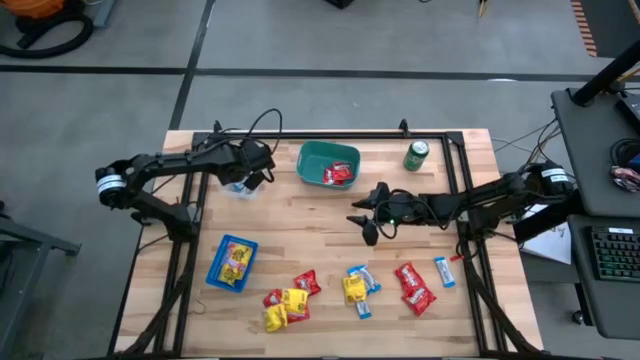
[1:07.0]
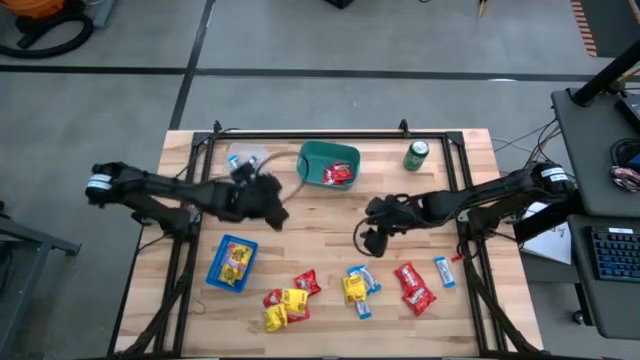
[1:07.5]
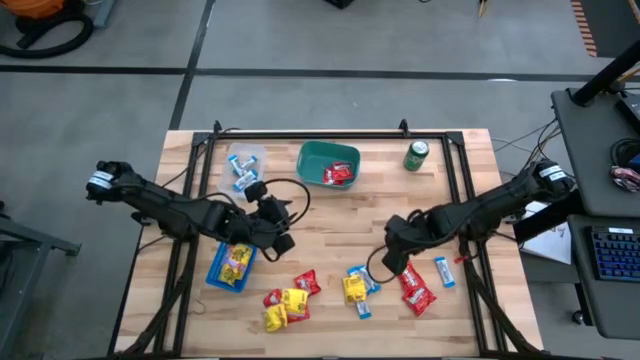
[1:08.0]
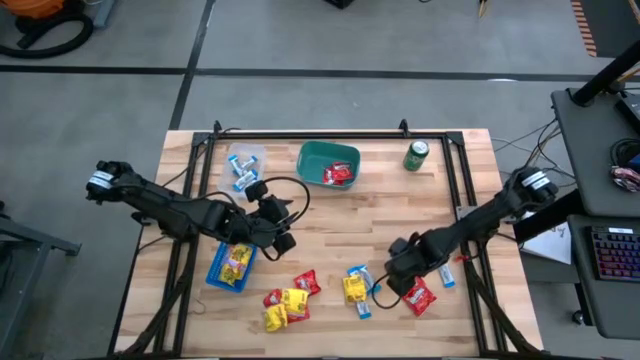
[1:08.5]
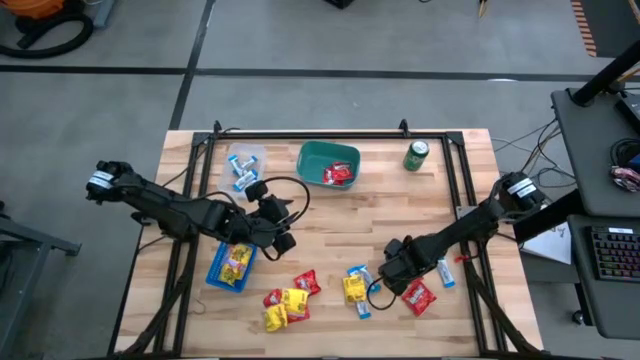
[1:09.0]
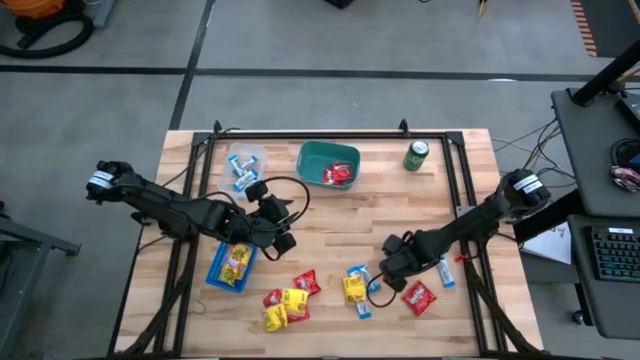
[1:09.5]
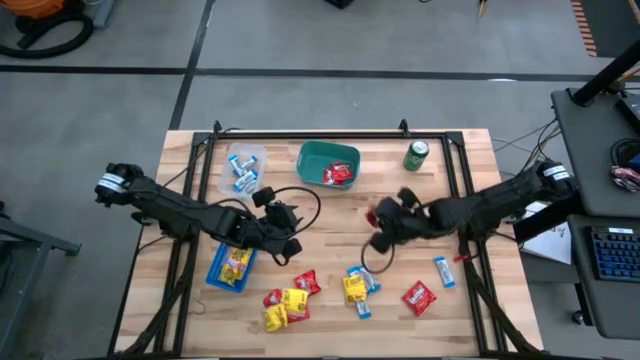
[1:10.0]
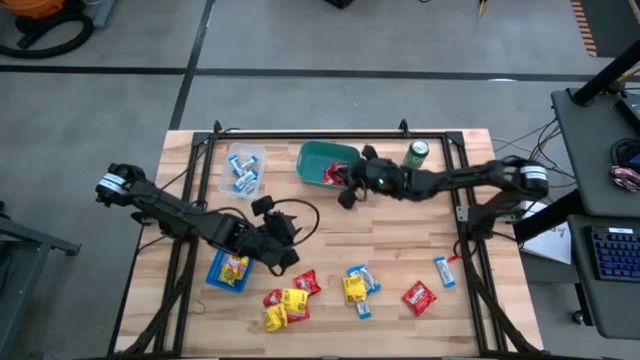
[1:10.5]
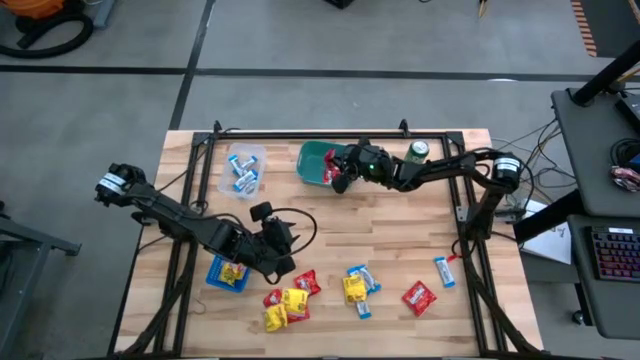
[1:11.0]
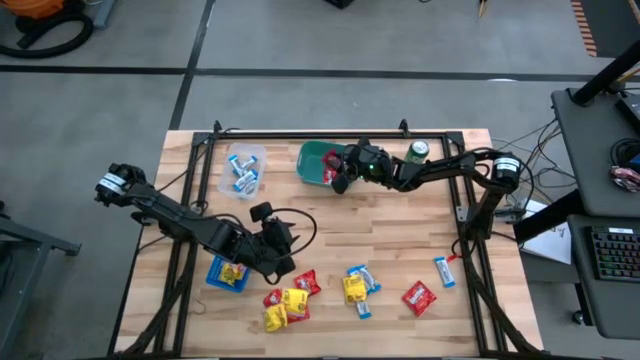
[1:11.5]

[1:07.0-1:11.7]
Task: Sort candy
Put the red candy into the green bin

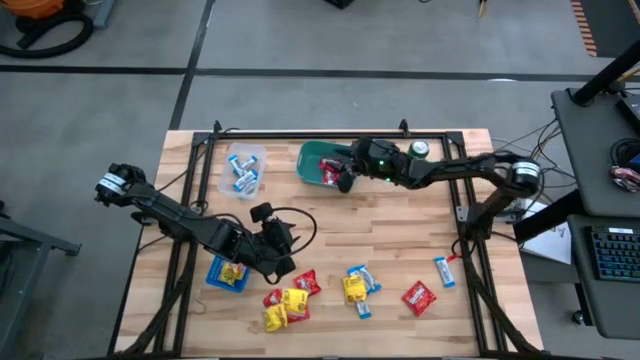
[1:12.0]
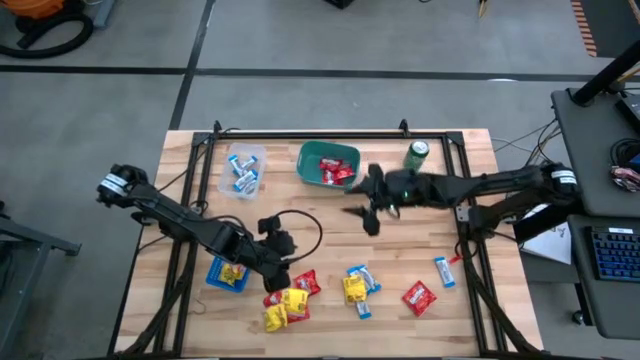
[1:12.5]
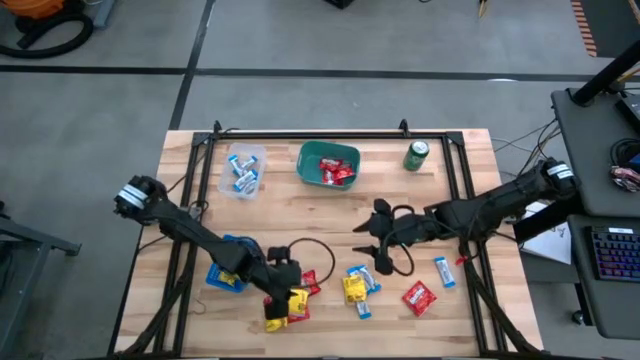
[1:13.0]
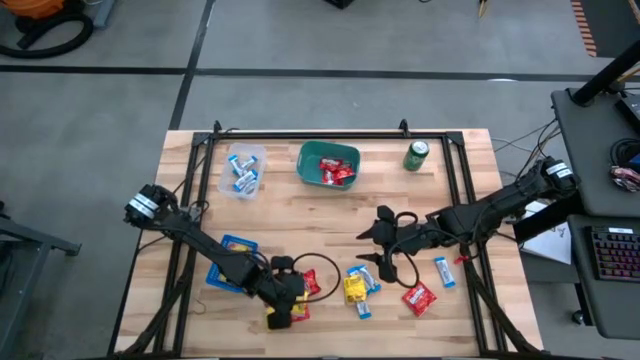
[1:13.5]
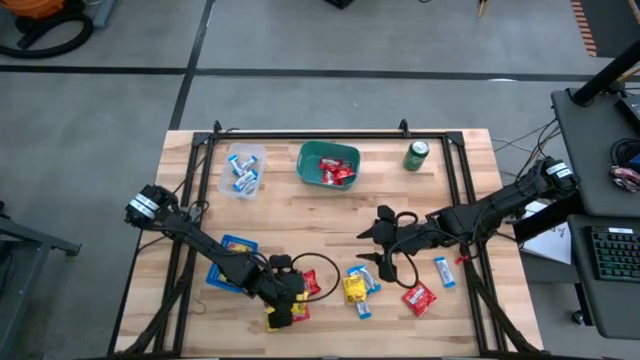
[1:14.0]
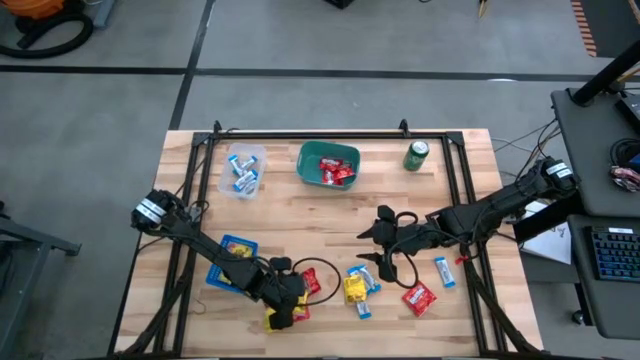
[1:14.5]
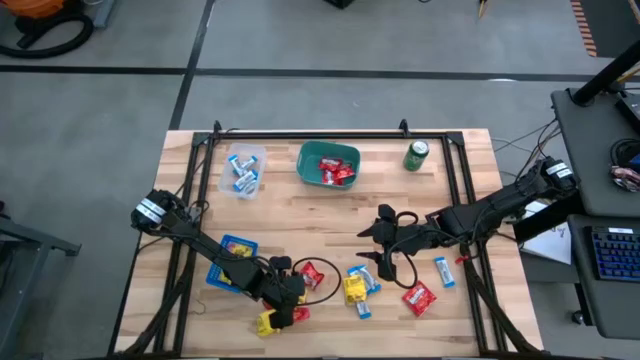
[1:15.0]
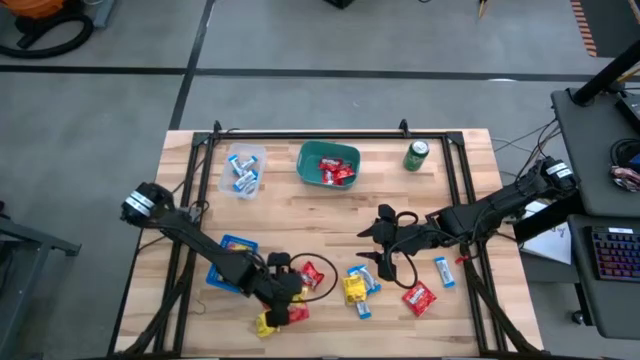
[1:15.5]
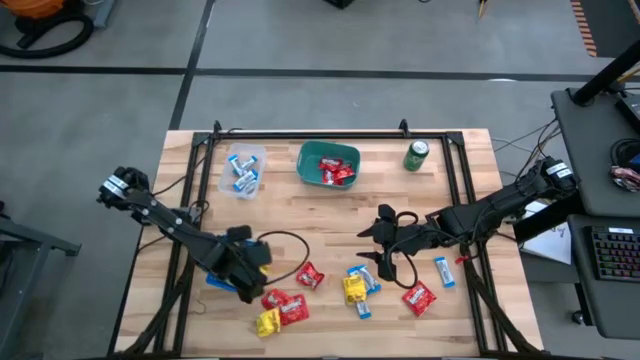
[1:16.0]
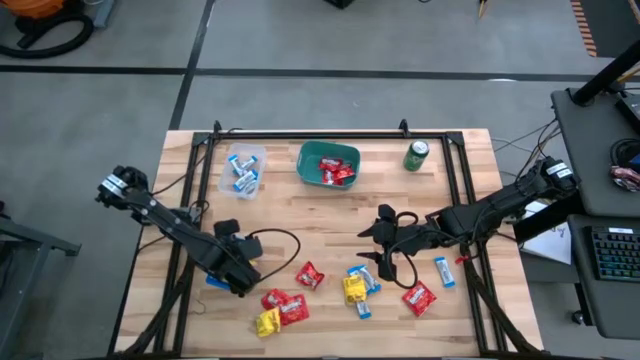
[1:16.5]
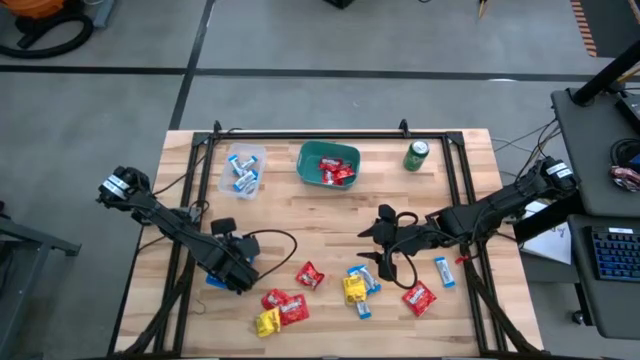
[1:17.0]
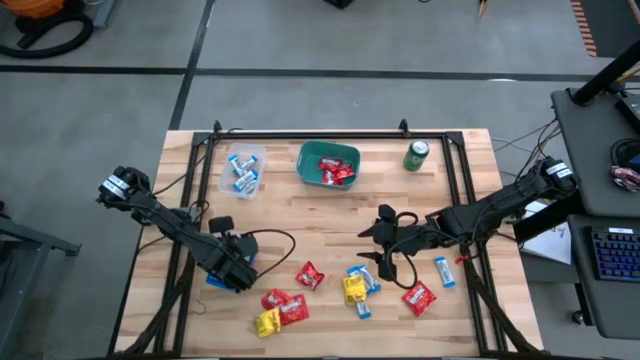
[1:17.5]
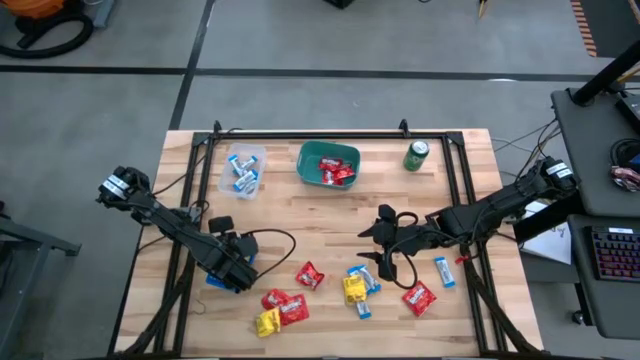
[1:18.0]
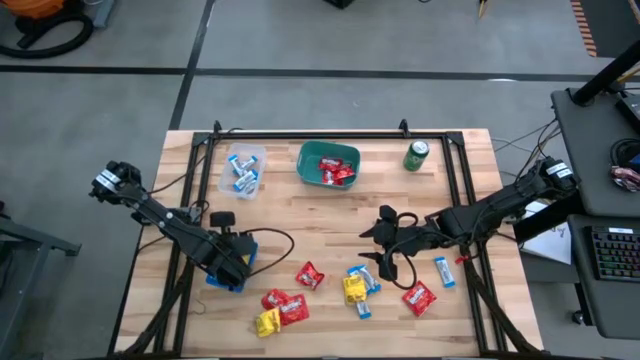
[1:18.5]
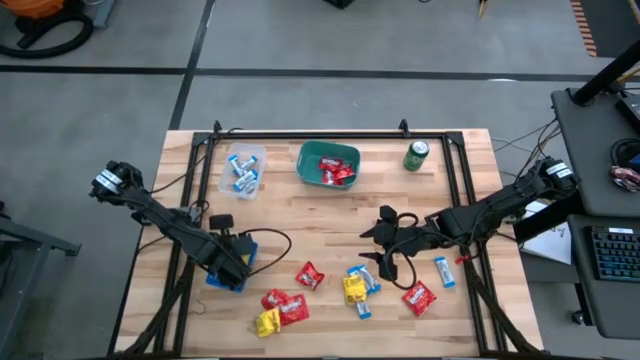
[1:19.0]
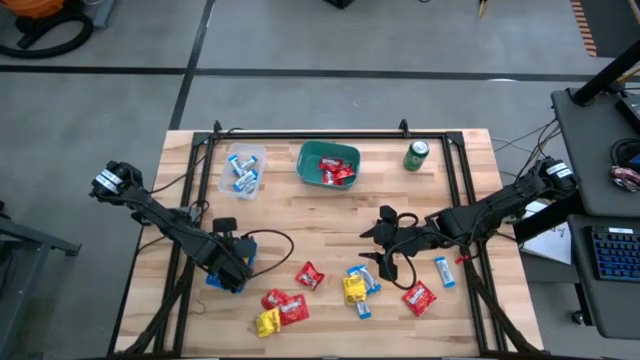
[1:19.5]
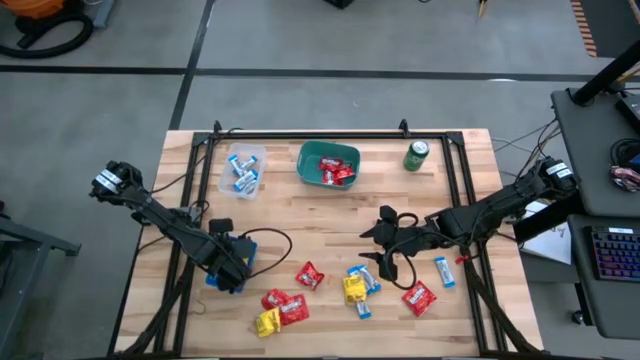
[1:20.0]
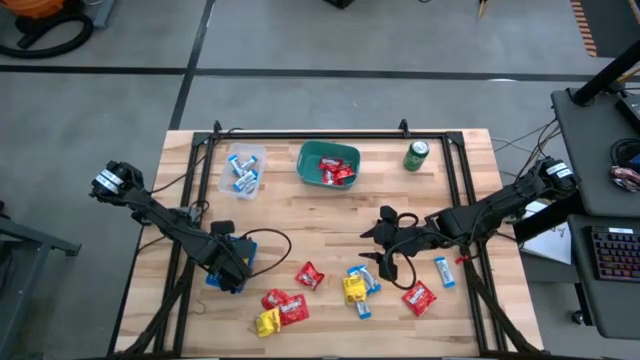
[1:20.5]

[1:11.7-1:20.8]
Put the yellow candy into the blue basket

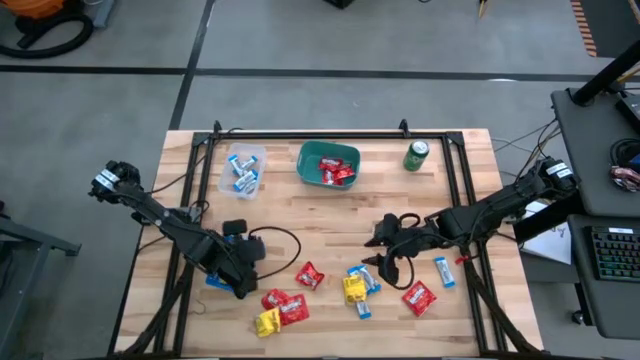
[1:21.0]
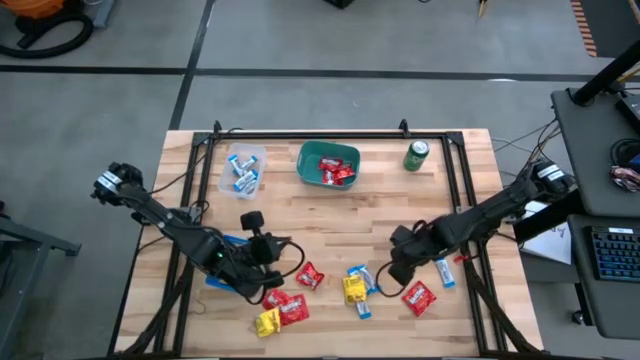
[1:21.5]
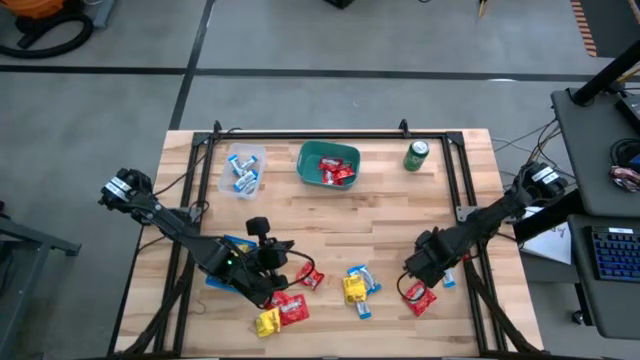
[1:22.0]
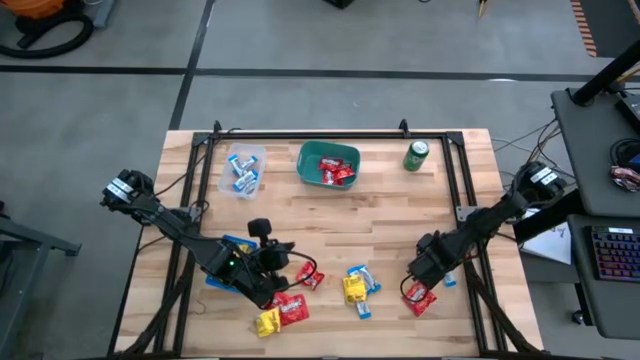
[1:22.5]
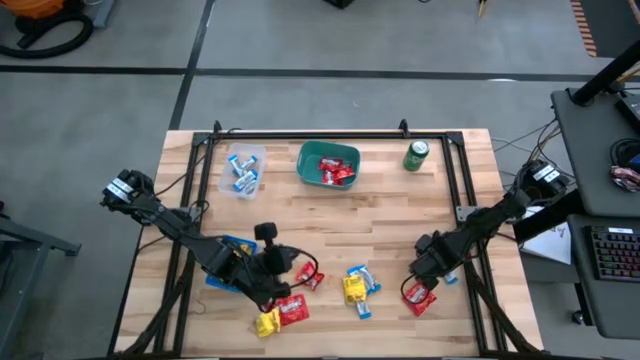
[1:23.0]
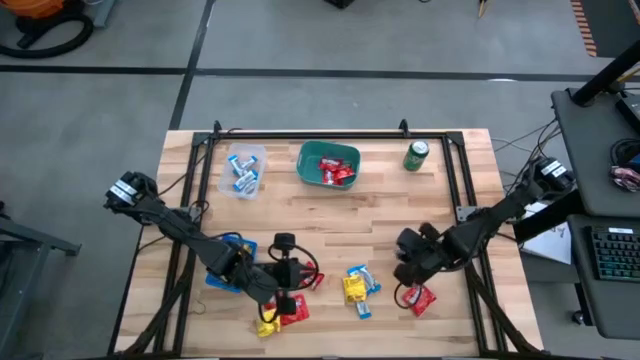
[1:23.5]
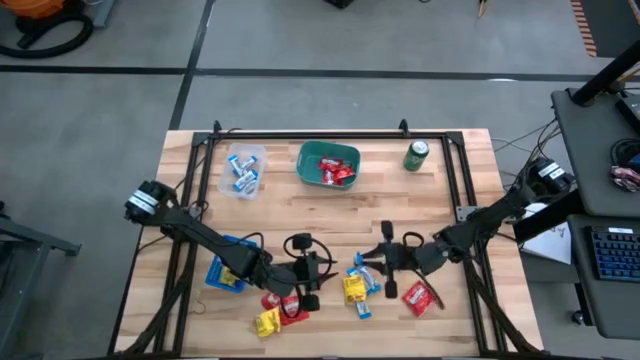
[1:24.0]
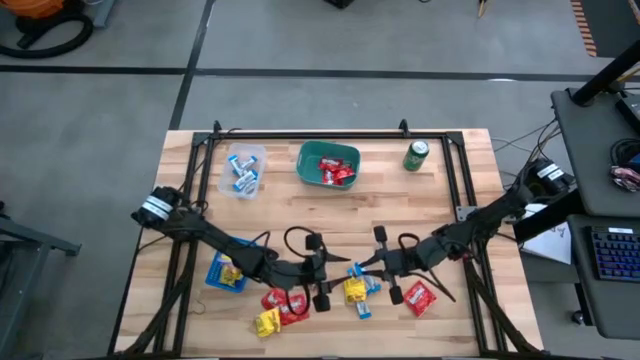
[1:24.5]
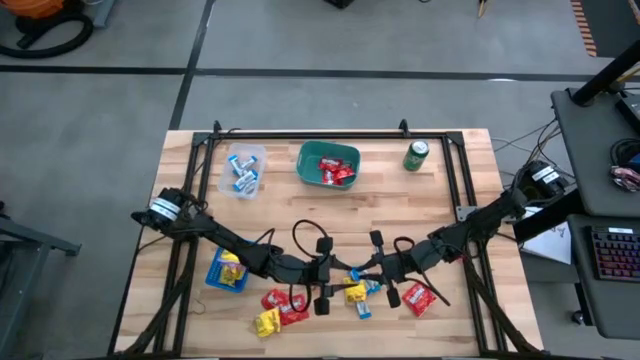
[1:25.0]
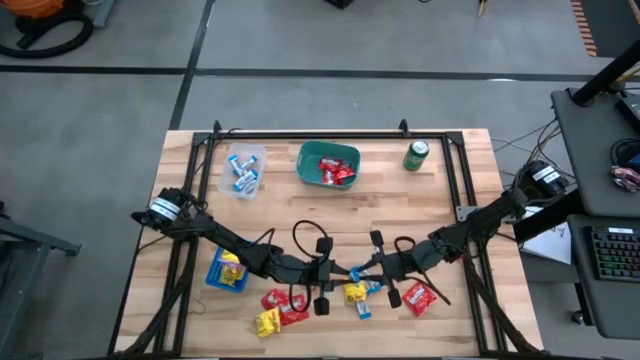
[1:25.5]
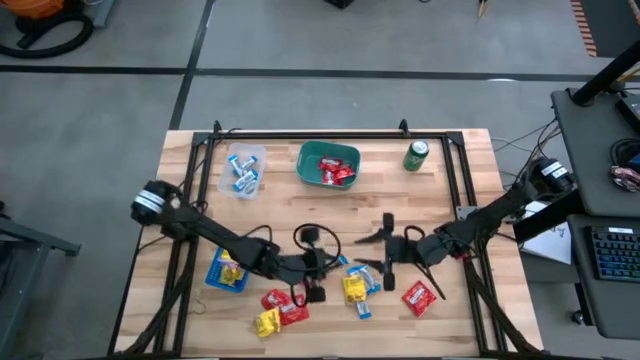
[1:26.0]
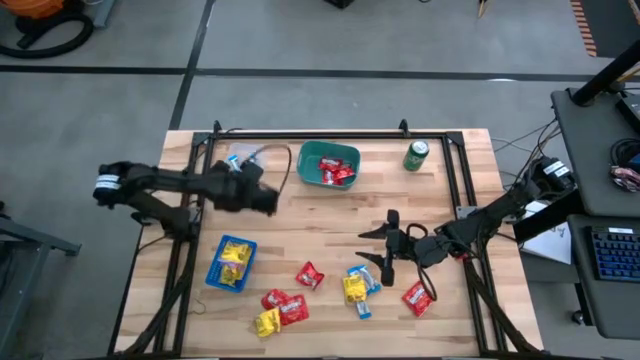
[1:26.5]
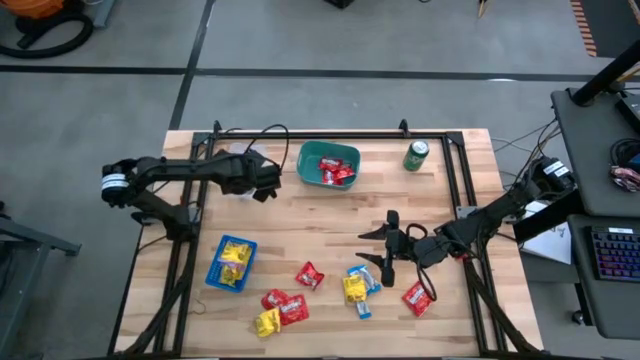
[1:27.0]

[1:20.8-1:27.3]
Put the white candy into the transparent bin

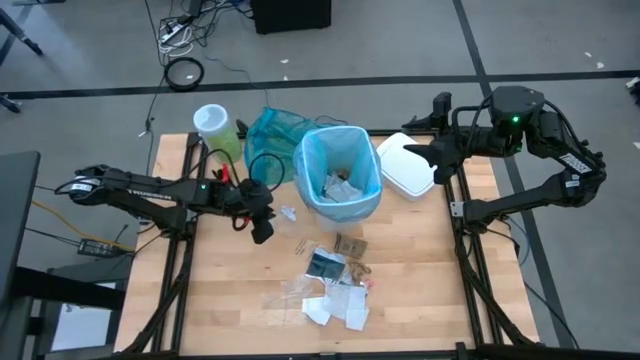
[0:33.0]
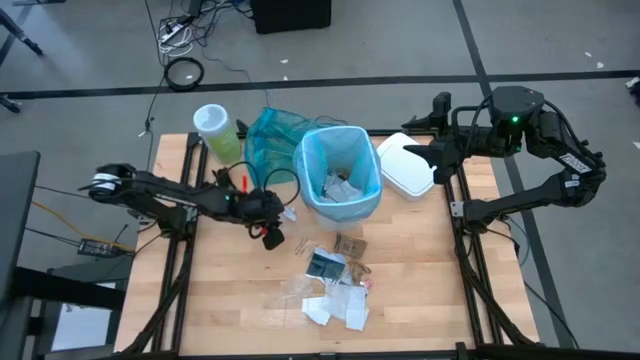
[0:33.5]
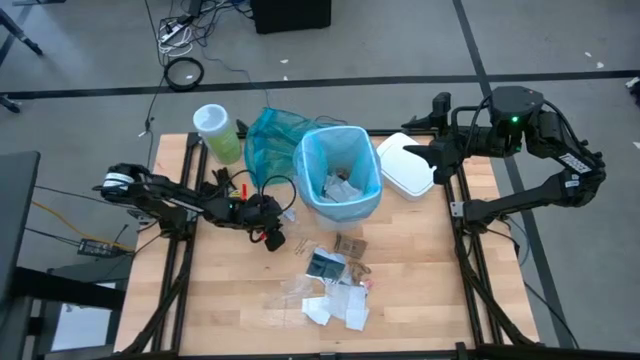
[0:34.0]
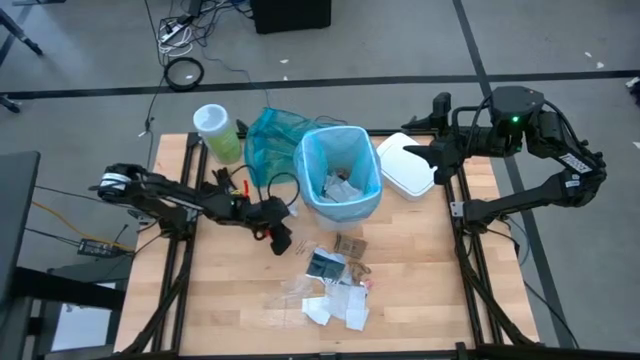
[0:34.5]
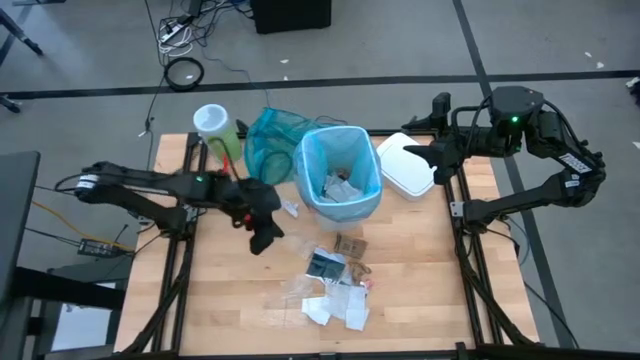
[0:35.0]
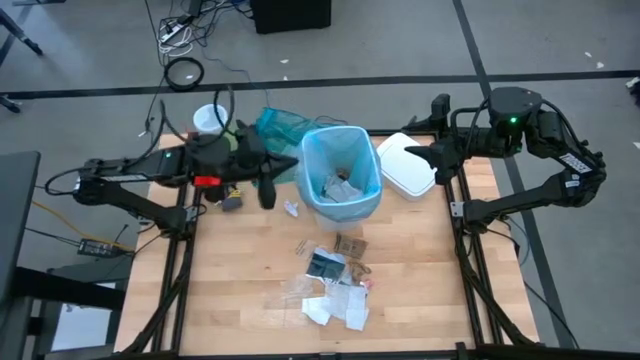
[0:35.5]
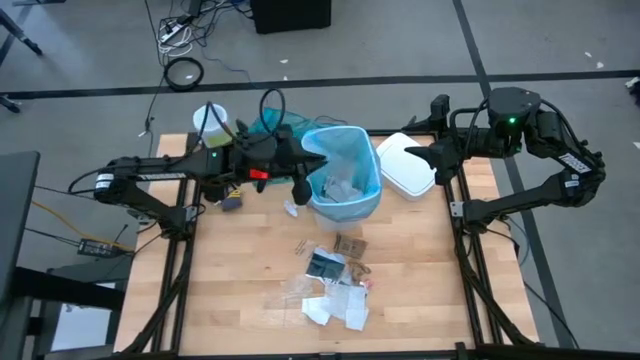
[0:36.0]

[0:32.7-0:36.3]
Task: place trash/remove bag and relplace
Put the clear plastic into the white trash bin
